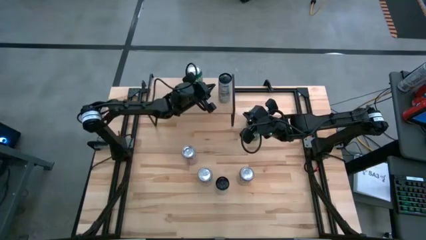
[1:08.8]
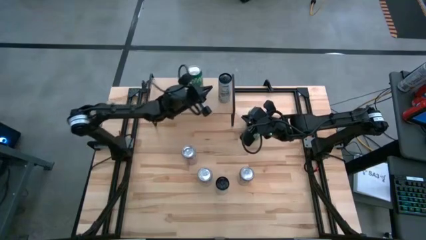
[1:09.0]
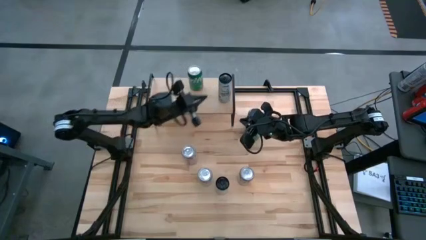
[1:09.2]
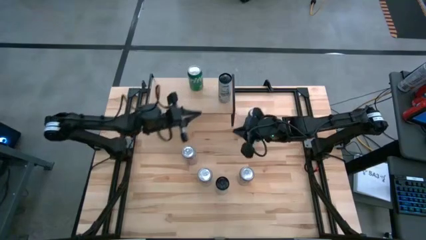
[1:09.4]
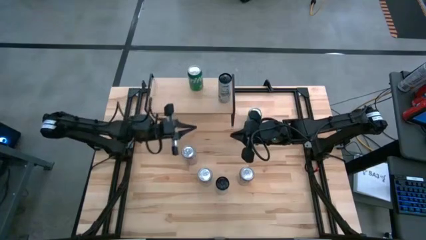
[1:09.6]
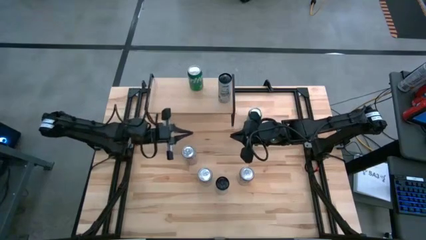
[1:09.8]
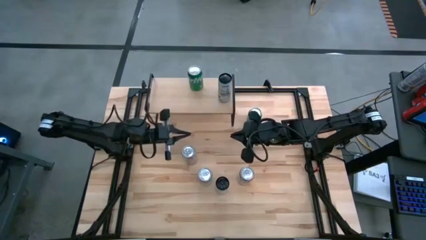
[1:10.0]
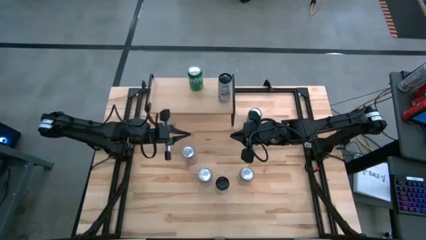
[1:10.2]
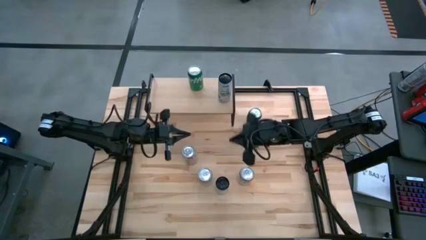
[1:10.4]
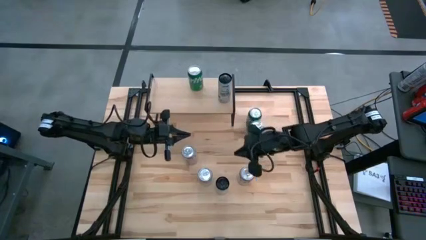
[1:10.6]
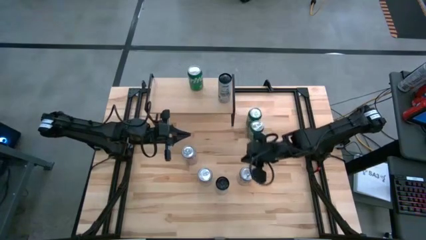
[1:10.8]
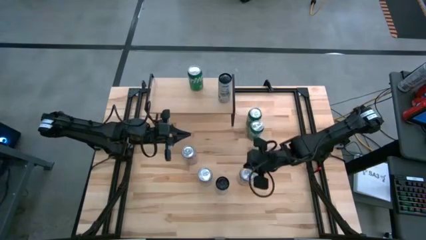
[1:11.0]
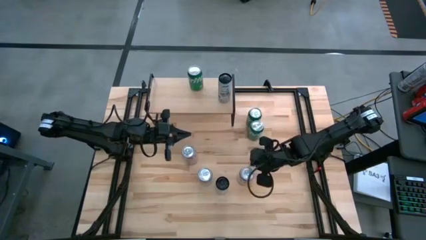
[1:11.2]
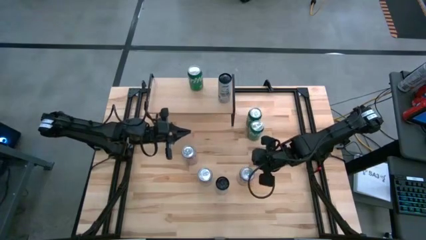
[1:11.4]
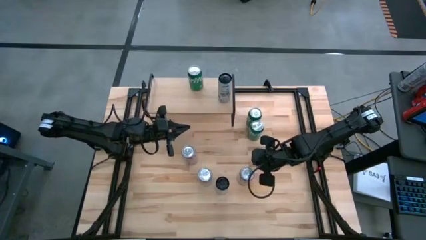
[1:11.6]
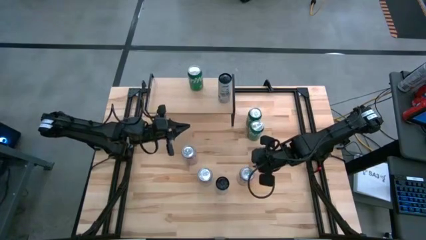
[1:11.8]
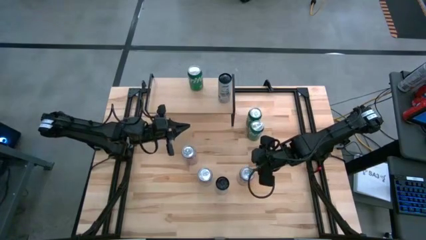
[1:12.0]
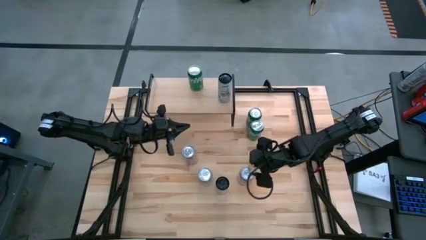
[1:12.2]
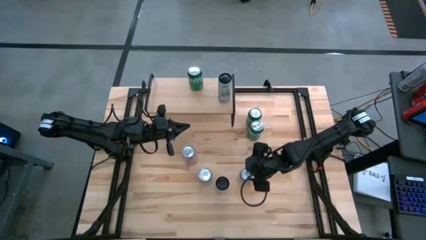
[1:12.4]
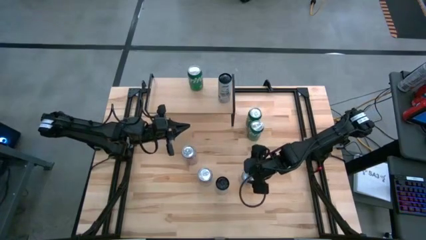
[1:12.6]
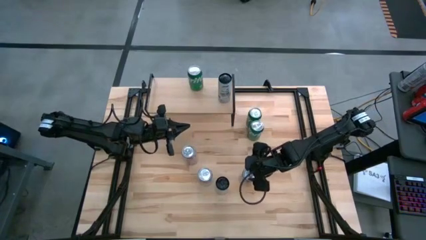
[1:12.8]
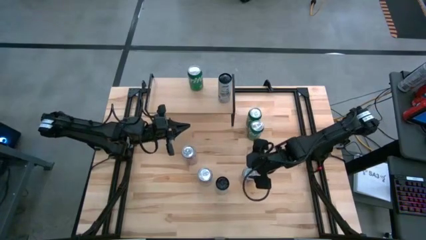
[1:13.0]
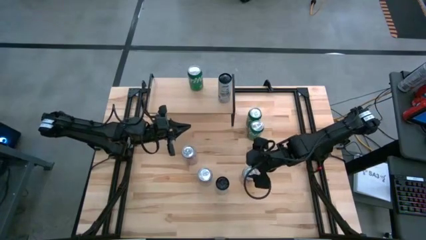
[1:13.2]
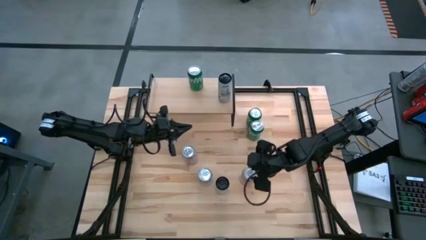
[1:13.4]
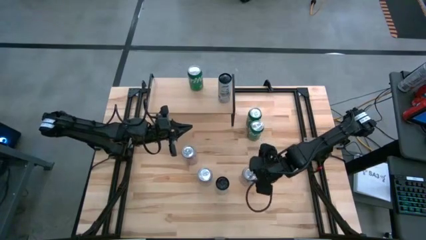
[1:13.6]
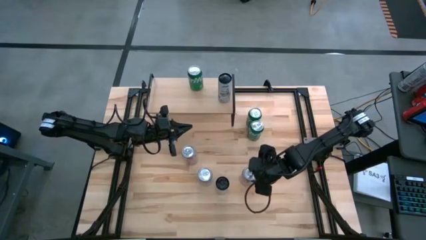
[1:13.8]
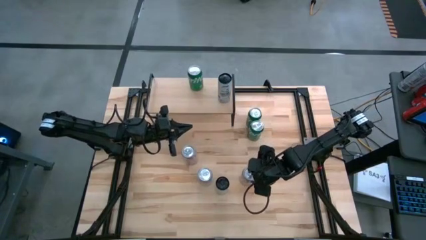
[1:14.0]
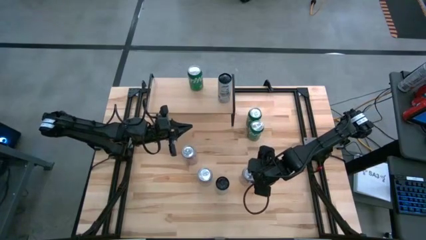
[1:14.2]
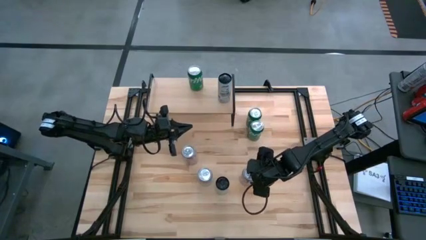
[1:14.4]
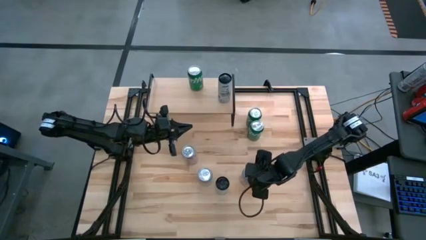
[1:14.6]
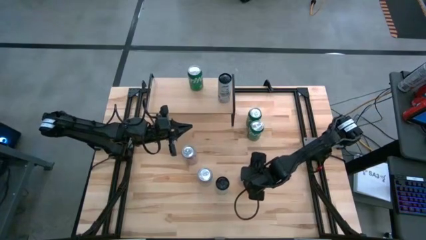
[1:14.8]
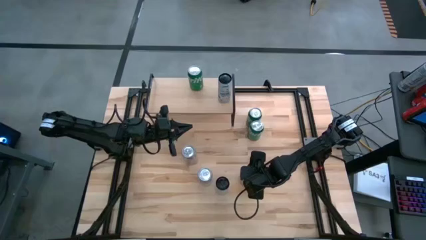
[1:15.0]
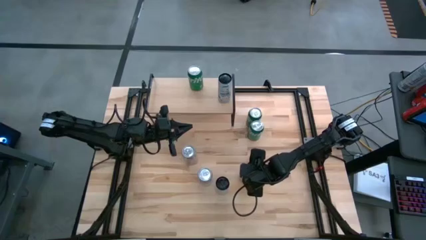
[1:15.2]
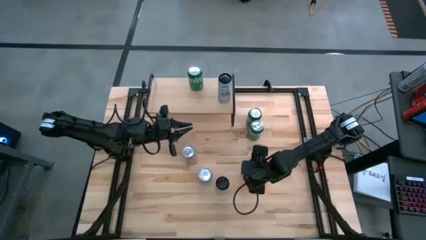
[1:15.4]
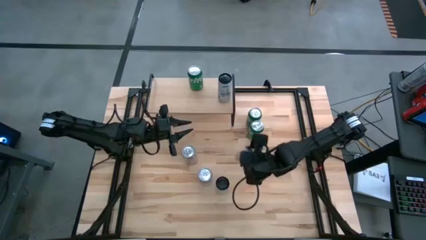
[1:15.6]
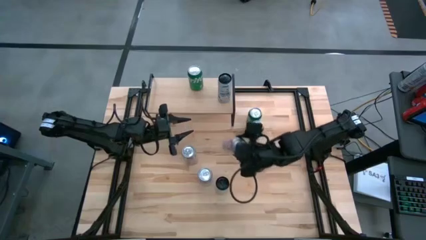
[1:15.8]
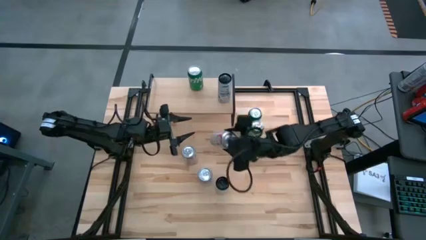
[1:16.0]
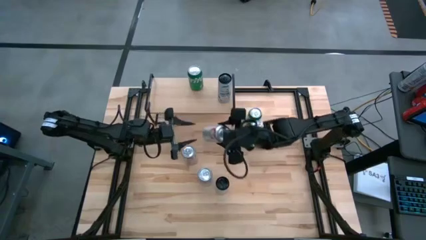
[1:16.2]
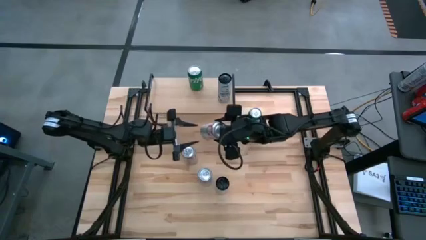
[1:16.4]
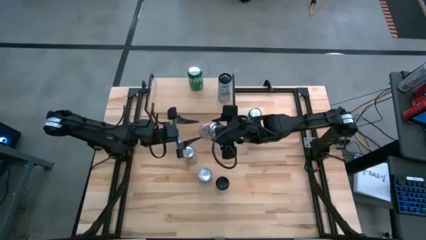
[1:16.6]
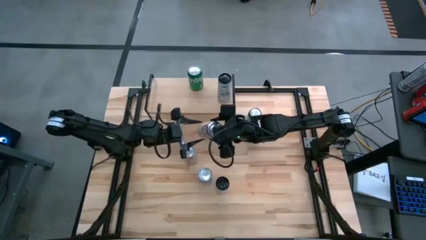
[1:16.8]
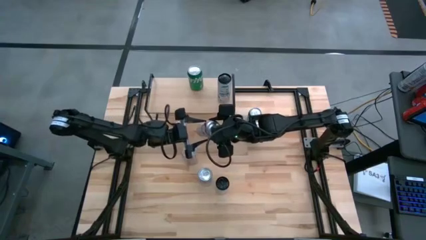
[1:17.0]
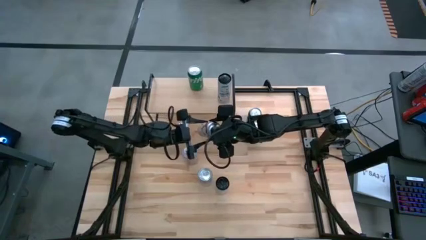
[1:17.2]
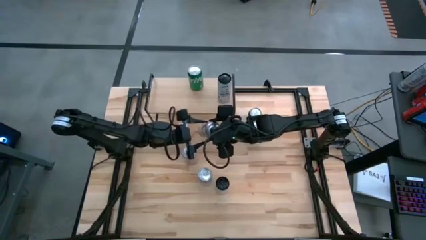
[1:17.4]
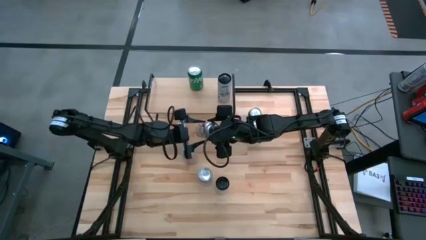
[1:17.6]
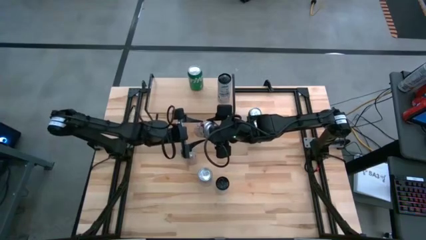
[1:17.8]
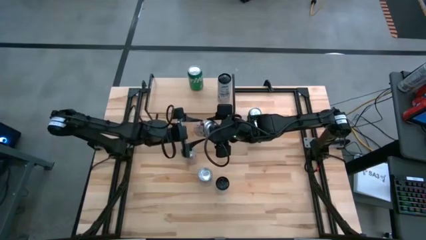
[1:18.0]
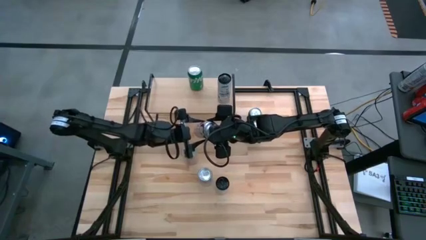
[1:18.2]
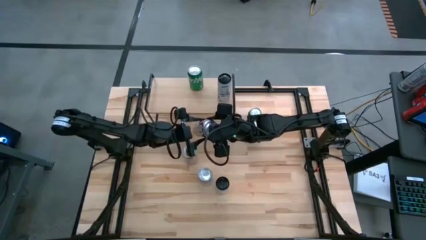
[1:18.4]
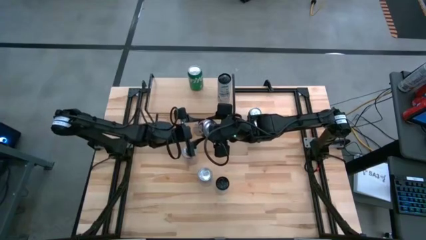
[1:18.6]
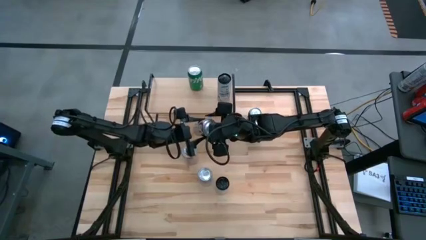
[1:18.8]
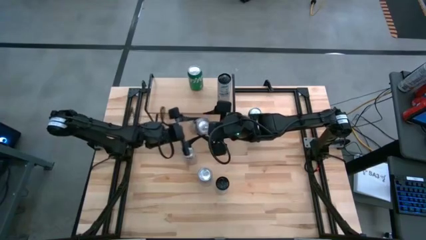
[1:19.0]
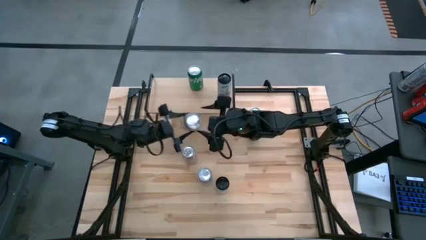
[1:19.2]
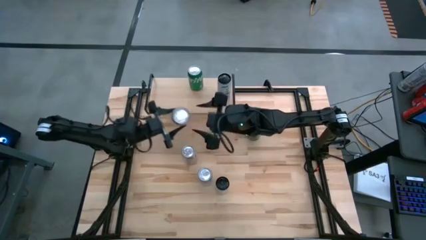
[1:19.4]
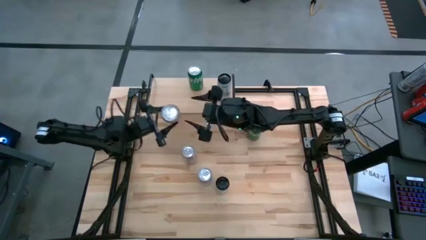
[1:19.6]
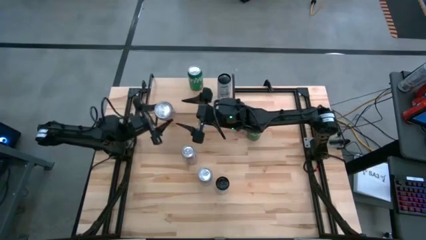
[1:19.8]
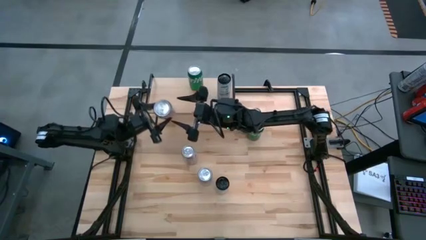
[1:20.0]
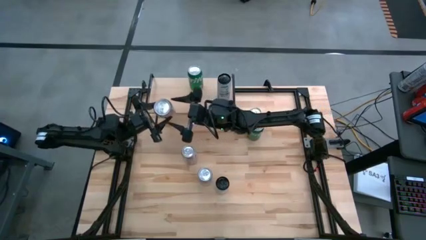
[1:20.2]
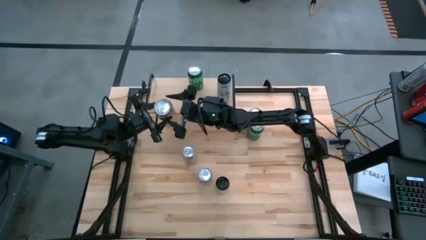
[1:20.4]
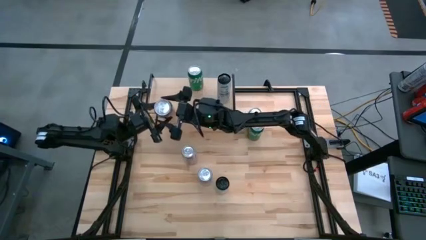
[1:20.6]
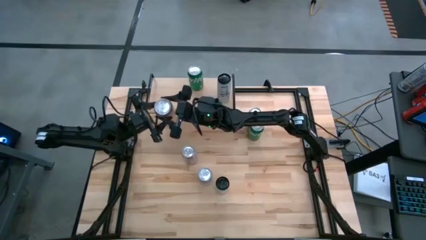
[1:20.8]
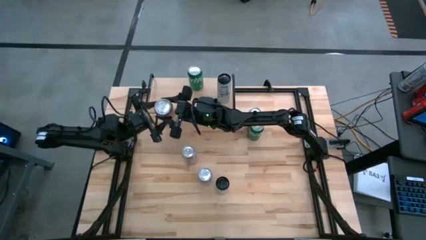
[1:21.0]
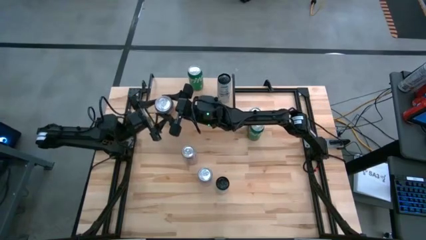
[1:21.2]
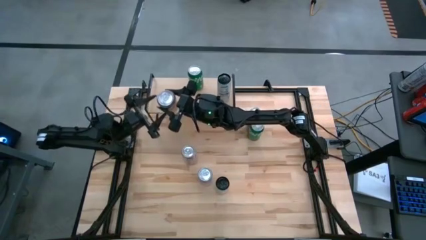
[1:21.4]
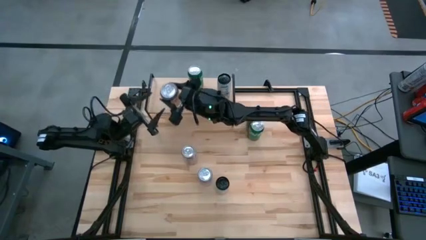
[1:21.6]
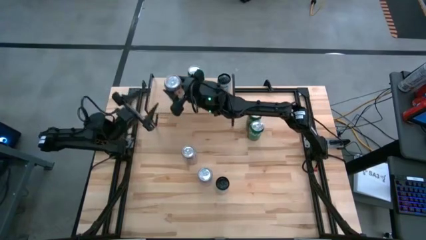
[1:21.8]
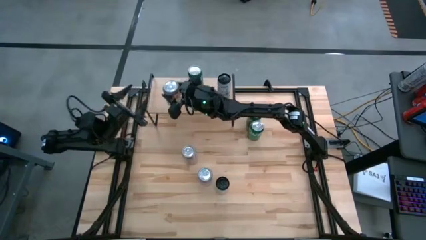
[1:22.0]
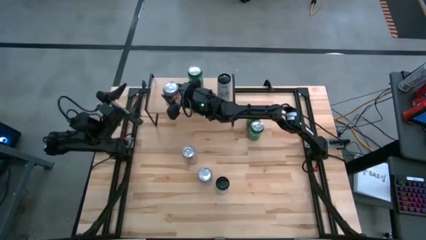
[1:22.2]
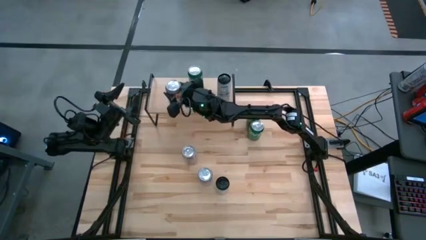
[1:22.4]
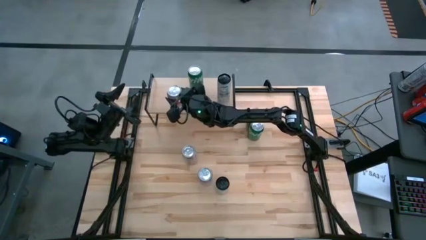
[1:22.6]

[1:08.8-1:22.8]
Task: Place canned beverage on shelf
Put the bottom right red-silver soda can on the shelf

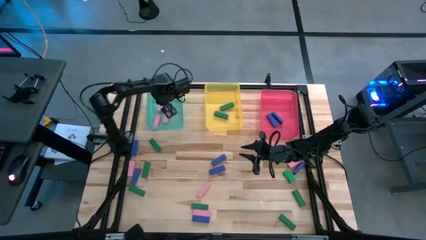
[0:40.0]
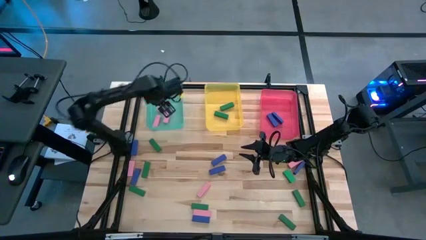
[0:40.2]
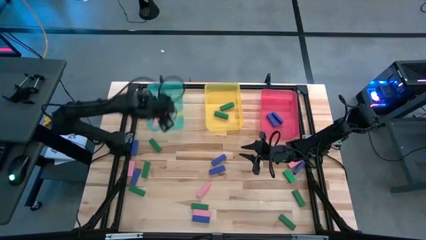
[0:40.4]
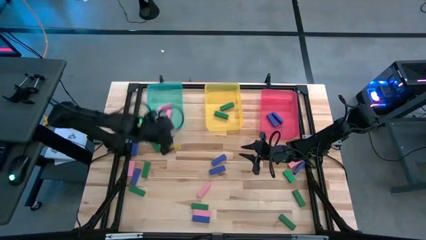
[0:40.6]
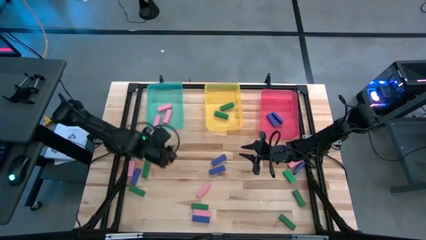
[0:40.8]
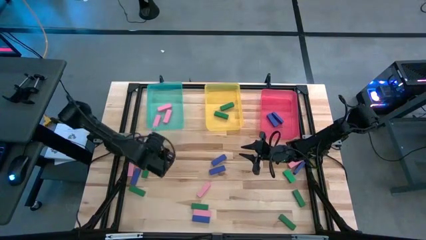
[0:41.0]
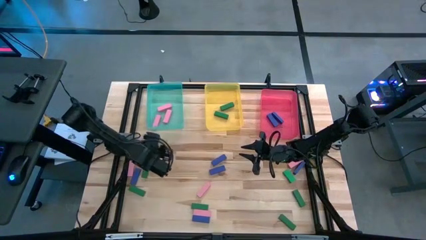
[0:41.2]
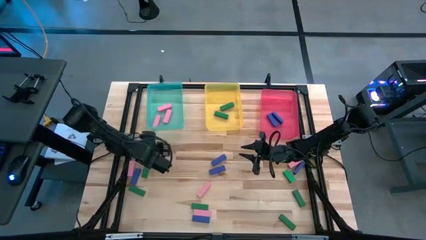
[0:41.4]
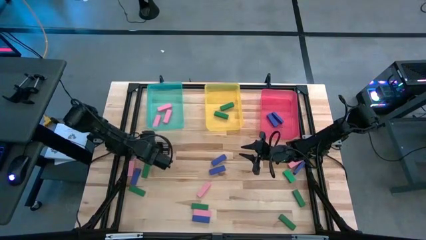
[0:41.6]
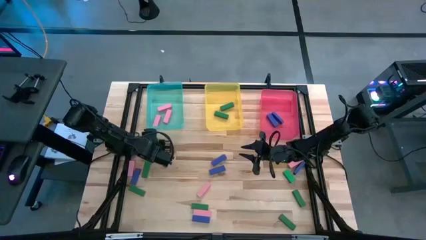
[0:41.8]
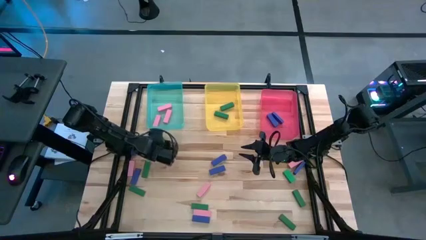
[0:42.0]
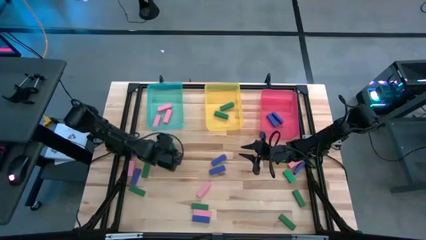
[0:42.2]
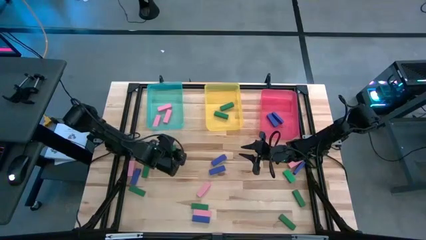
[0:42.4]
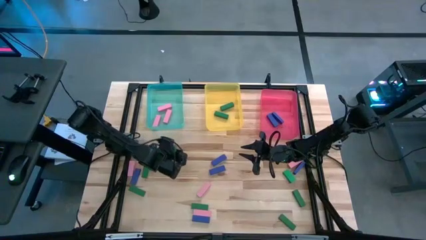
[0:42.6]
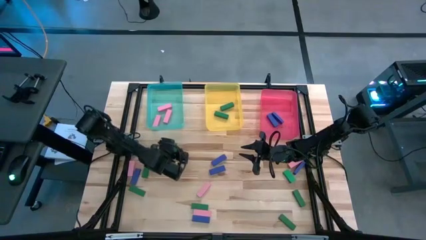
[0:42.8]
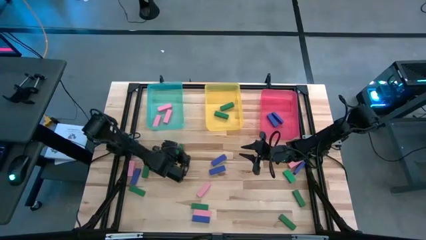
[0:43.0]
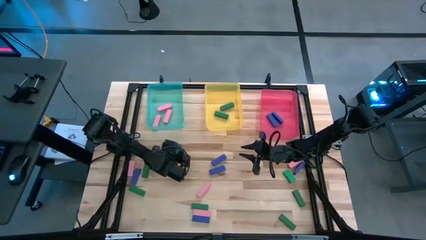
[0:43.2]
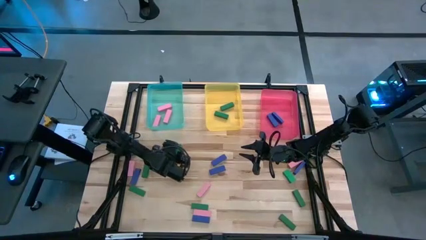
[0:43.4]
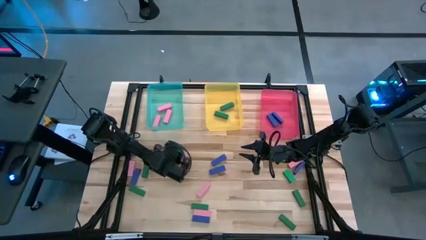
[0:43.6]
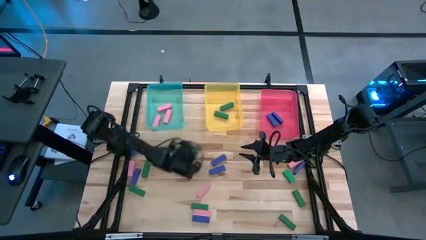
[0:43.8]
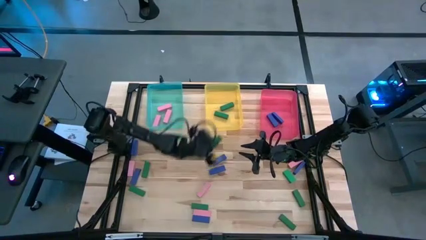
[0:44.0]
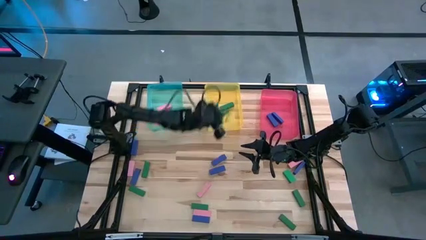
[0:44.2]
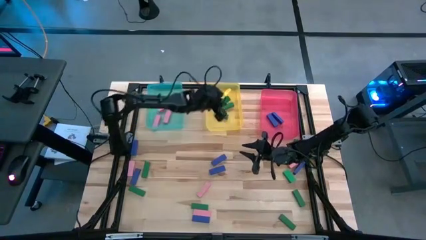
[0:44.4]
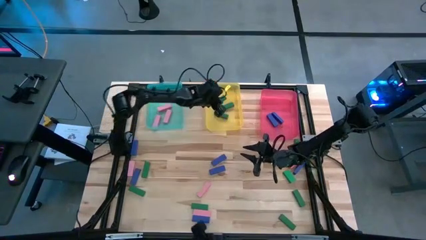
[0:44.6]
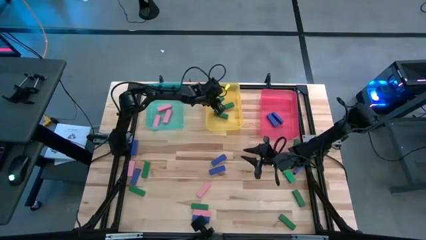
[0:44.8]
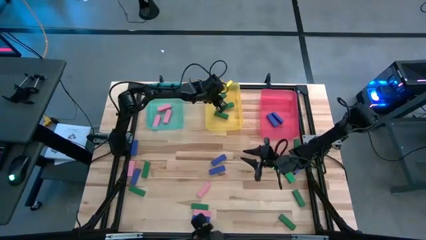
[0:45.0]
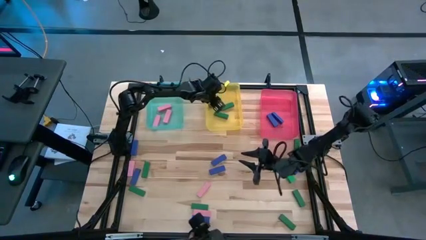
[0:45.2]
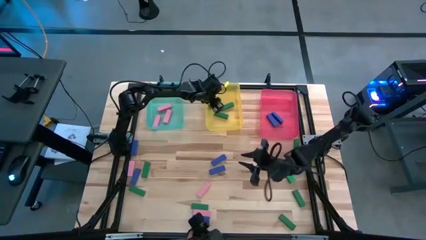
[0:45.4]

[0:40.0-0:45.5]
Task: Sort blocks
Put the green wooden block into the yellow bin
